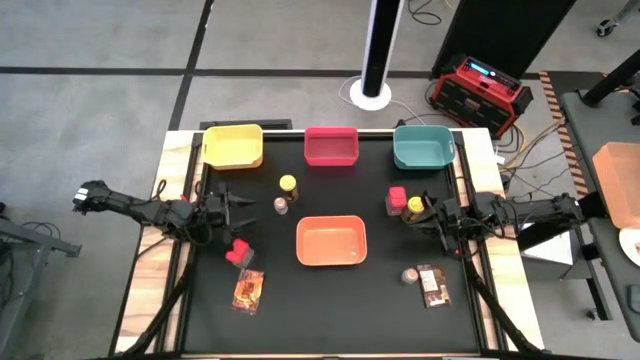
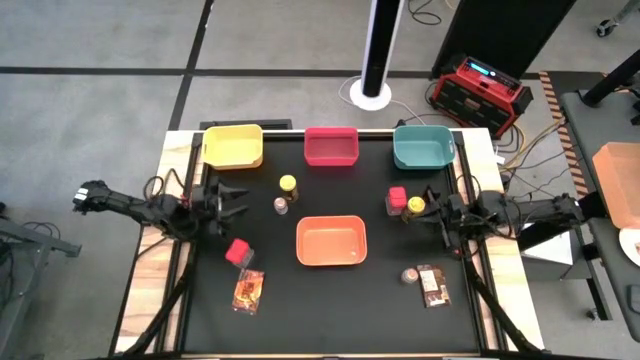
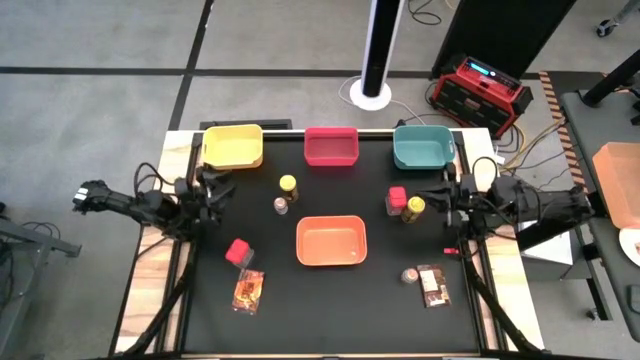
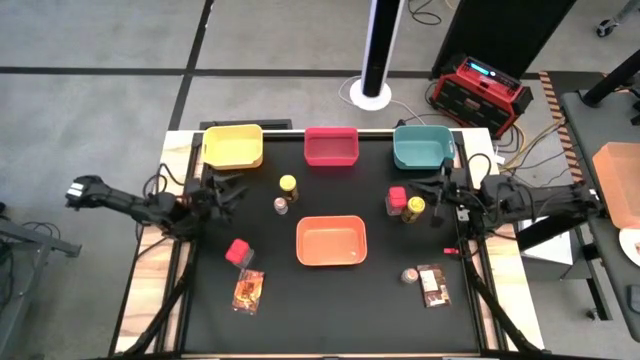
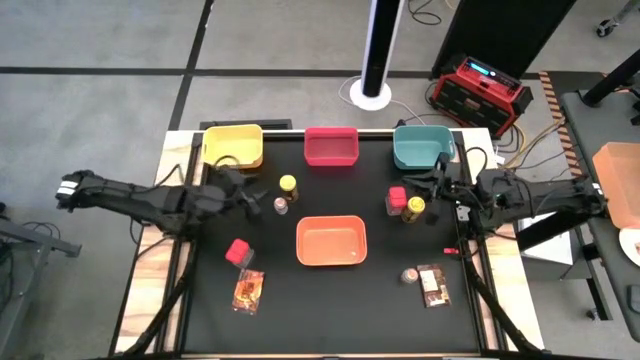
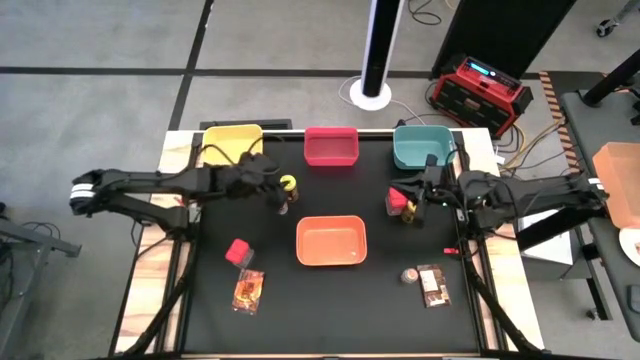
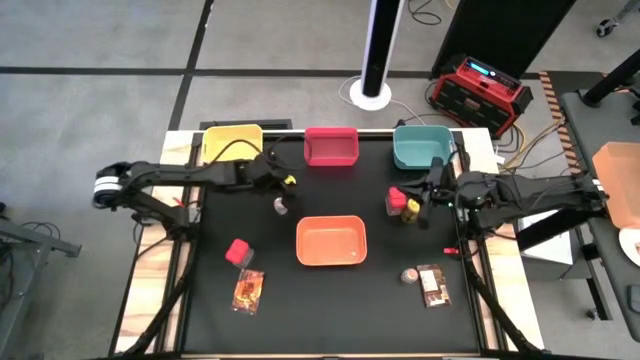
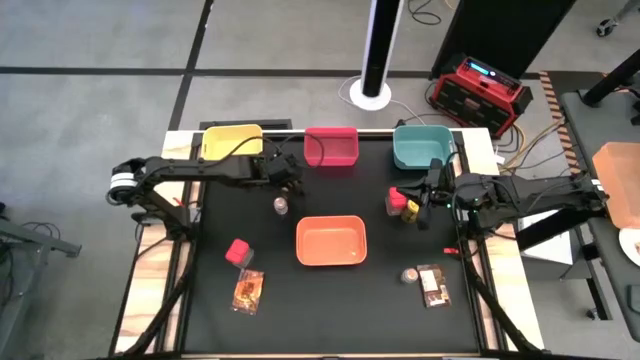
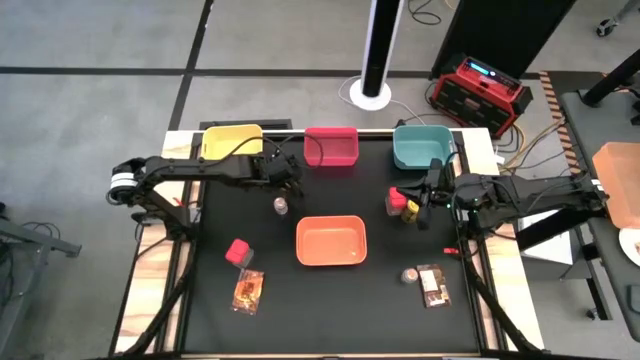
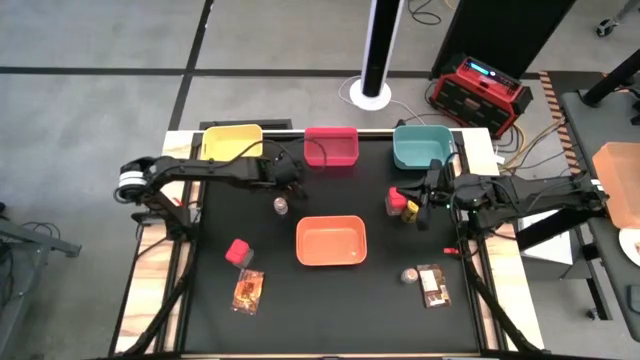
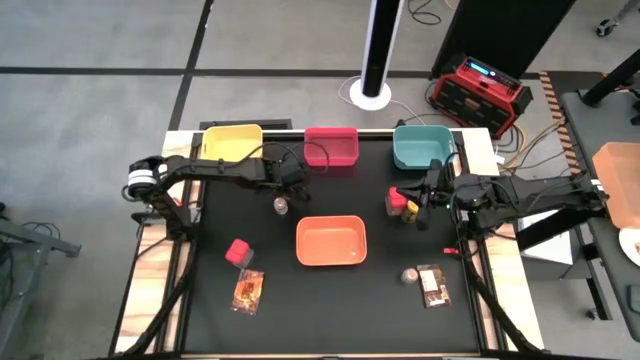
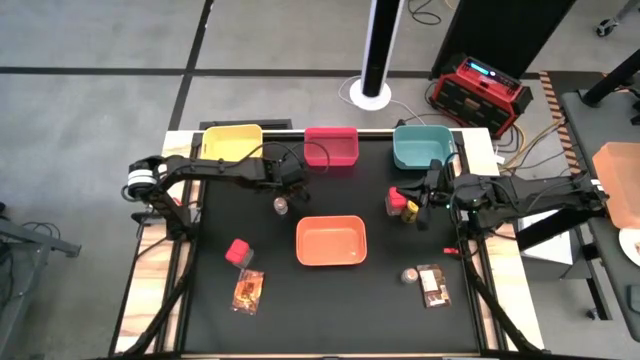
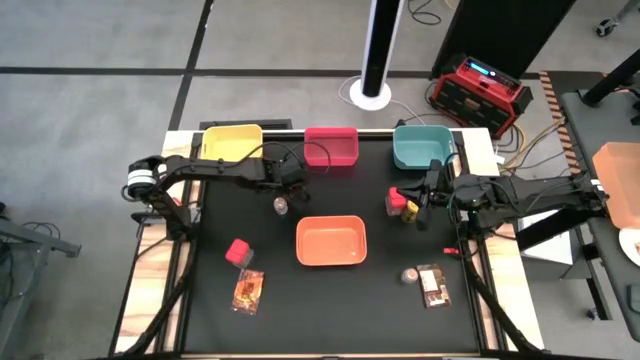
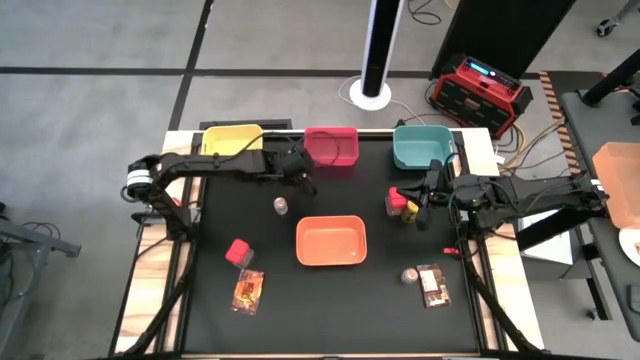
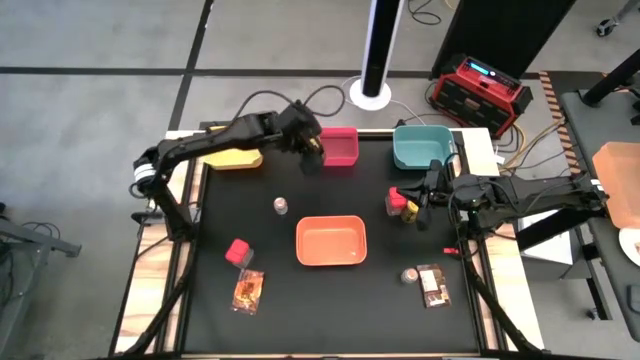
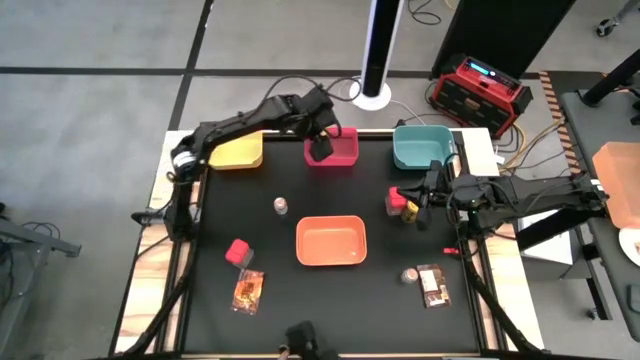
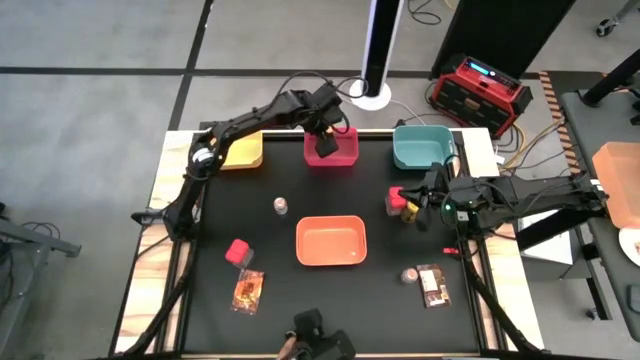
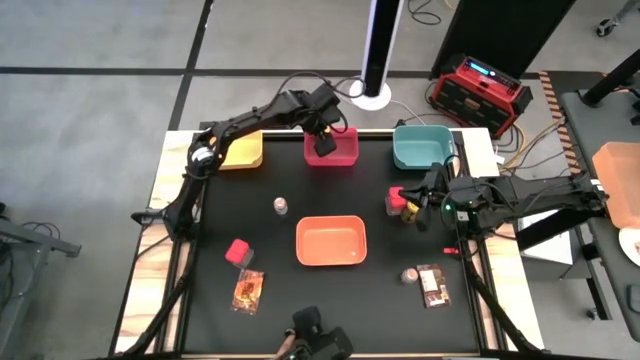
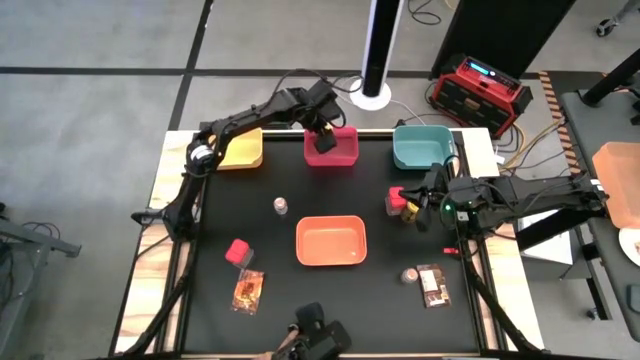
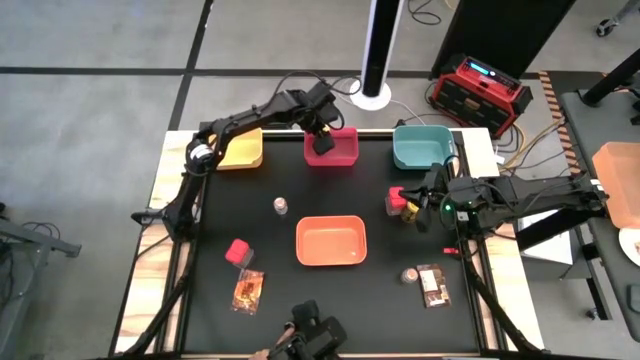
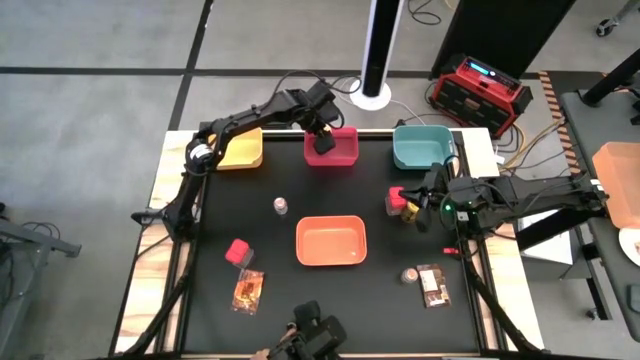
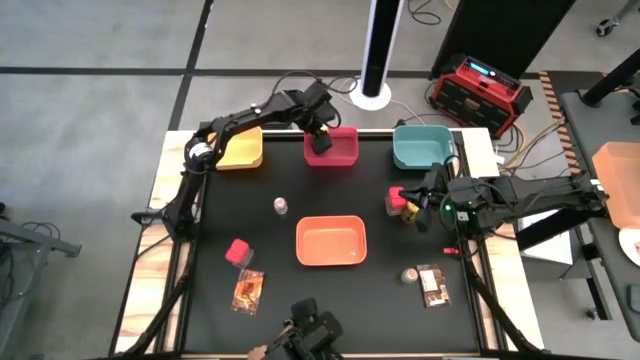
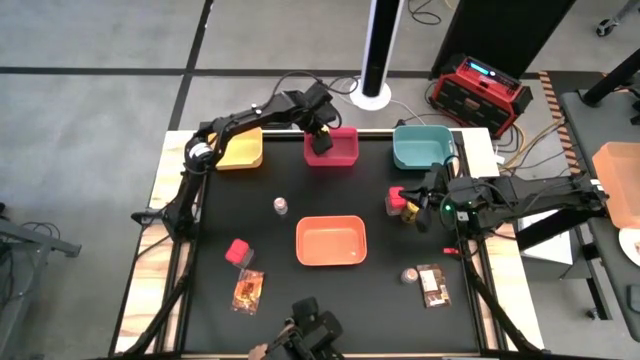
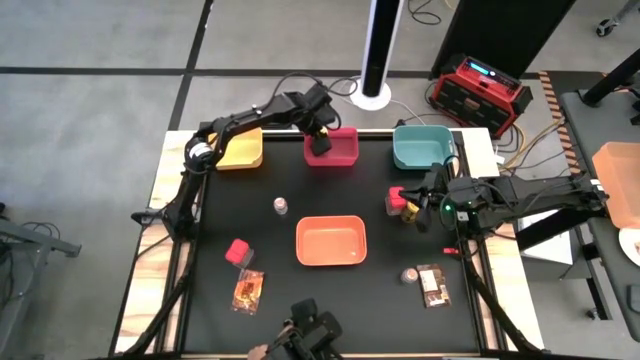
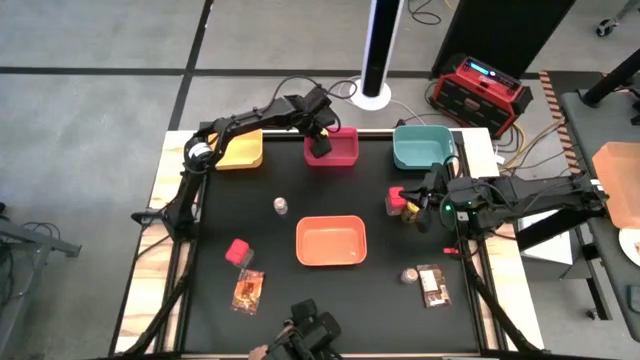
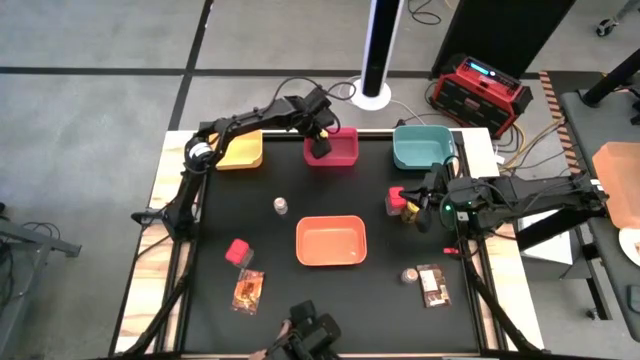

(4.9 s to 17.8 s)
Task: Sort spices by type
Put the left yellow seasoning bottle into the red bin

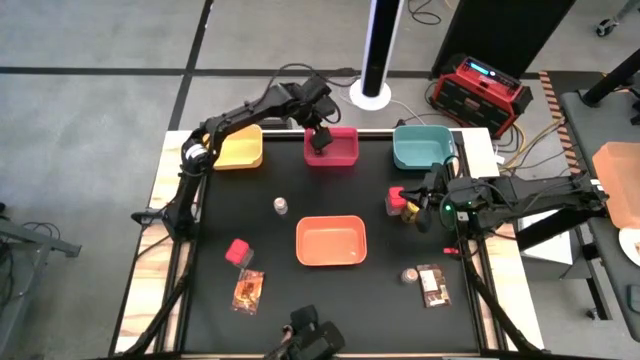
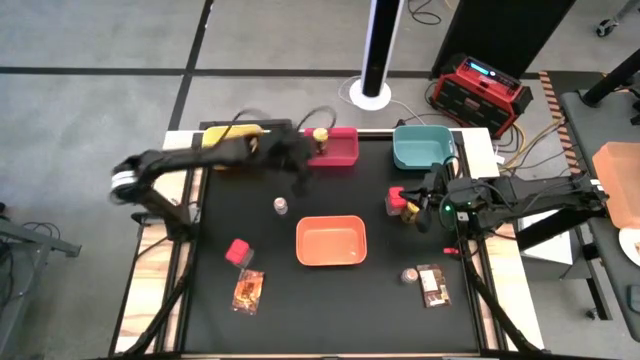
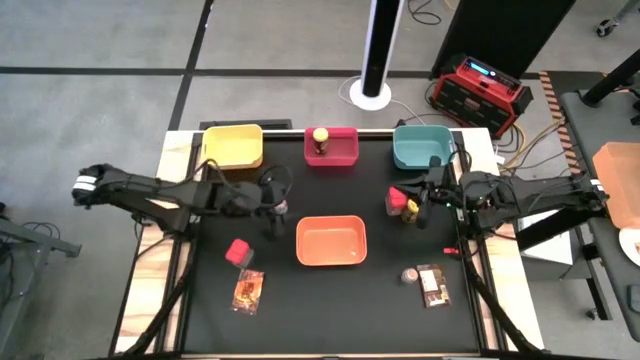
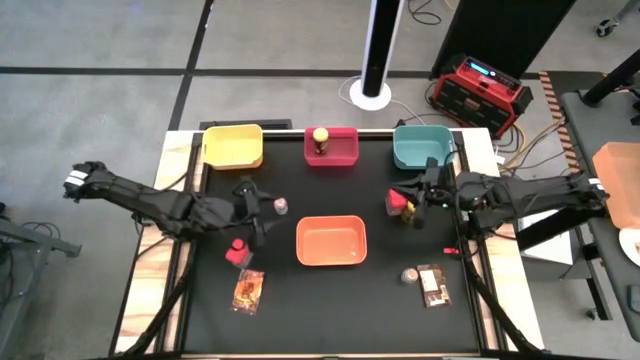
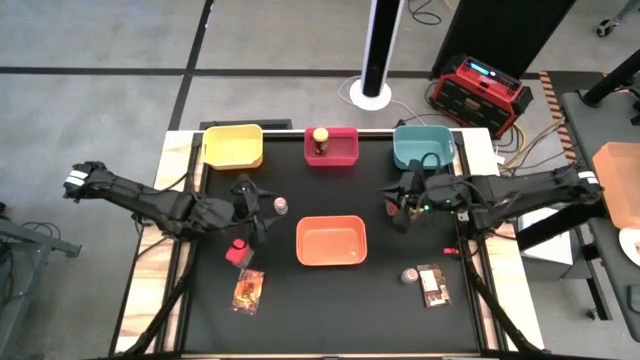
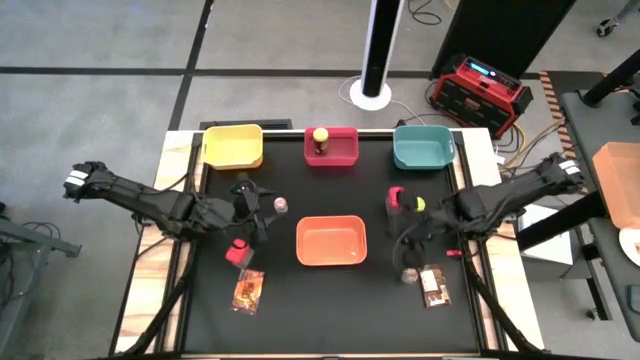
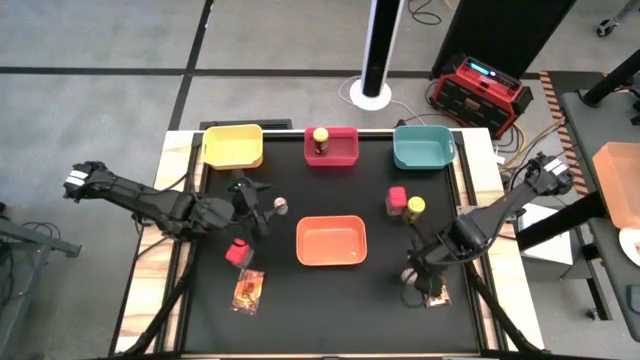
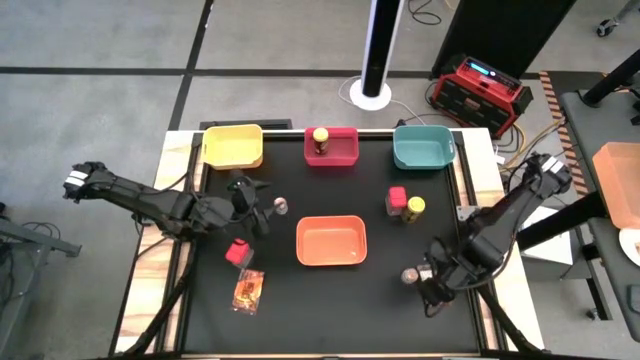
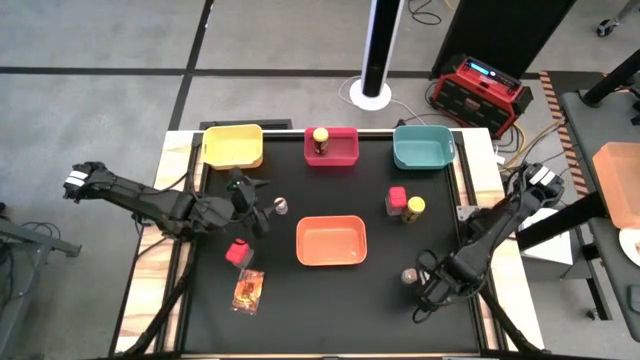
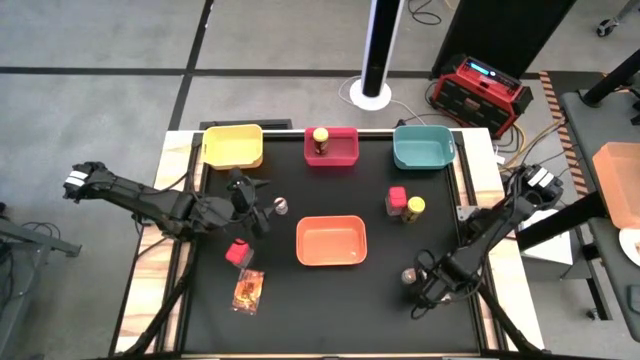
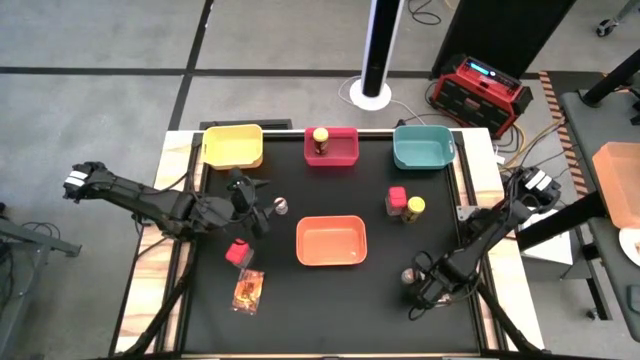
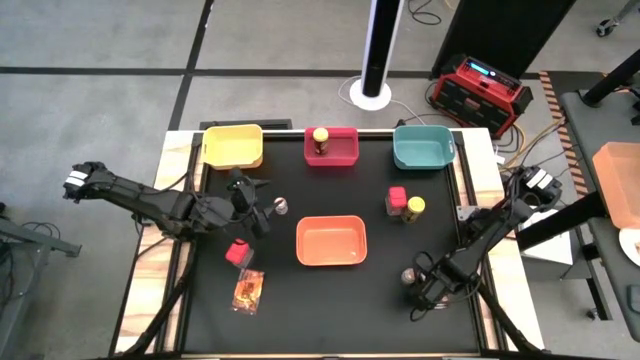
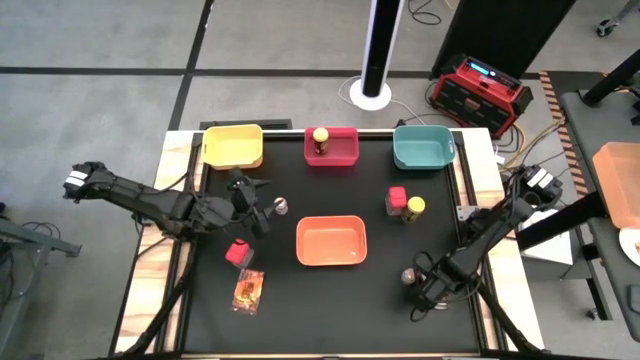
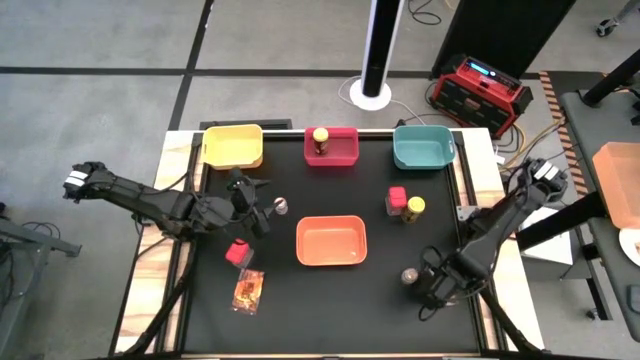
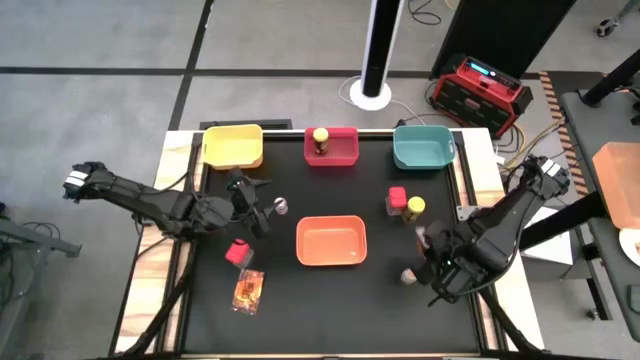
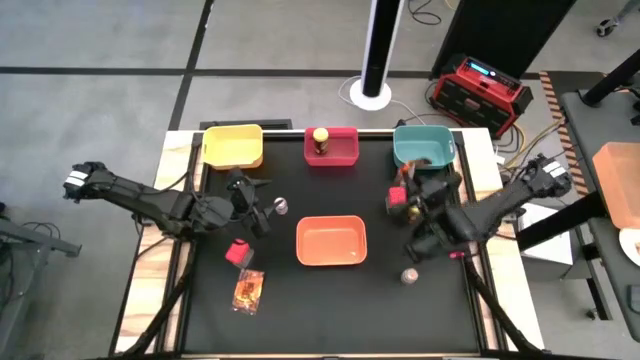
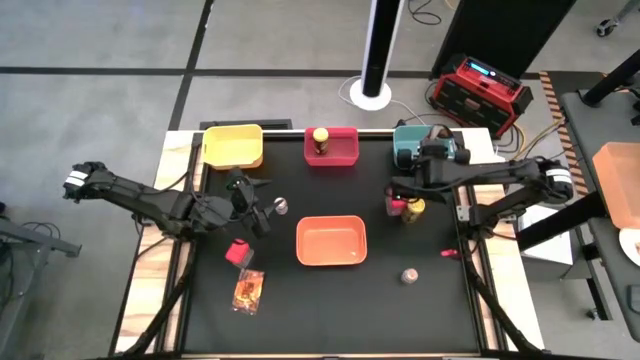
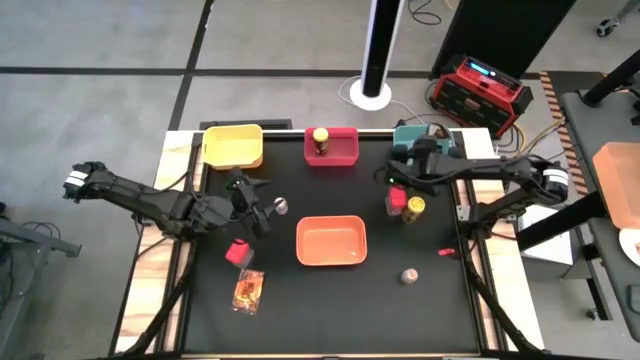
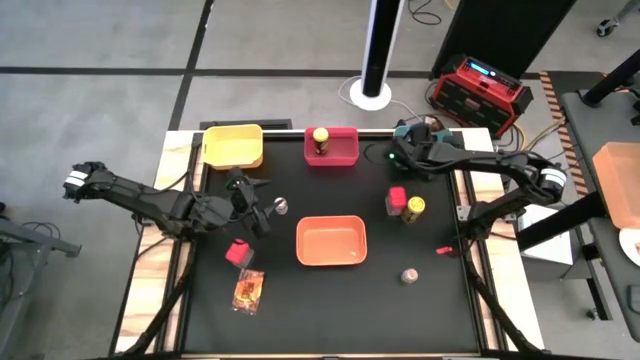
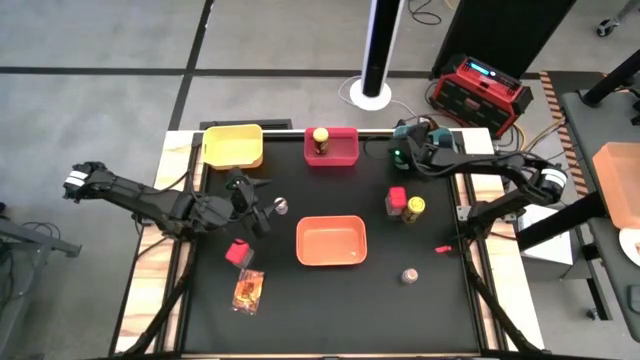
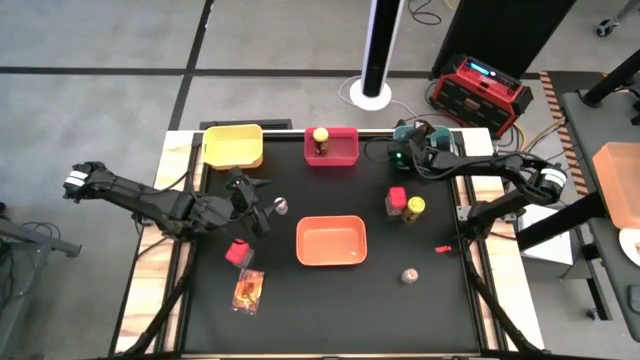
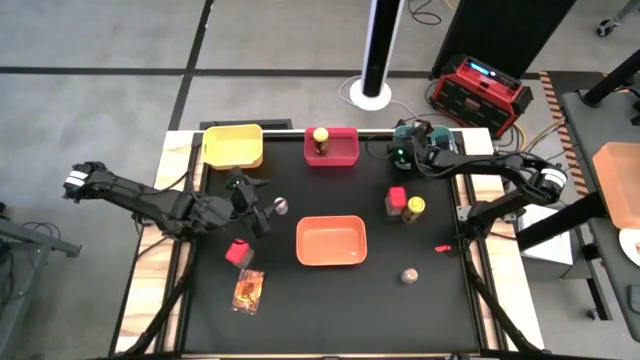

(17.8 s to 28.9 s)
Put the right brown seasoning bag into the green bin
